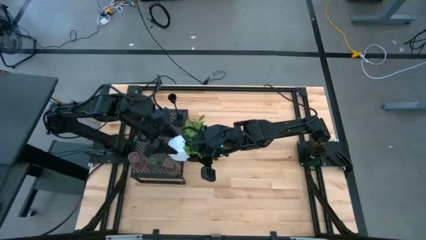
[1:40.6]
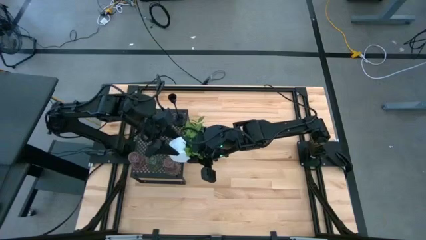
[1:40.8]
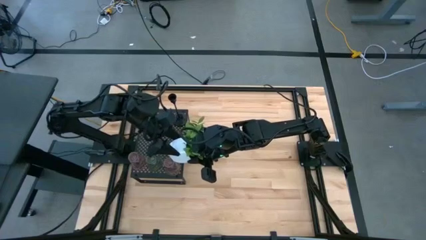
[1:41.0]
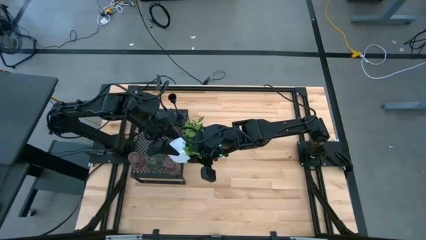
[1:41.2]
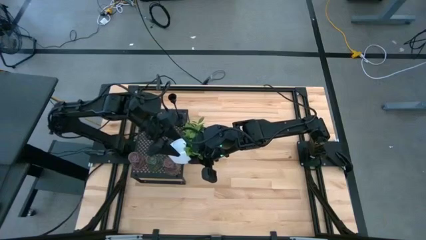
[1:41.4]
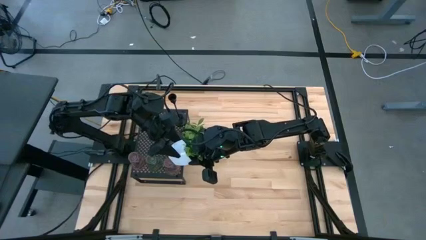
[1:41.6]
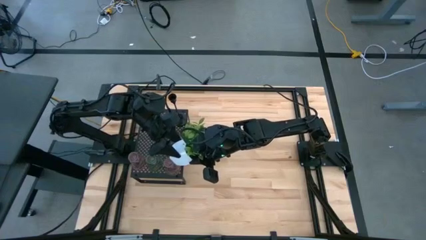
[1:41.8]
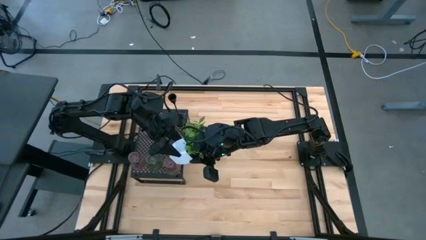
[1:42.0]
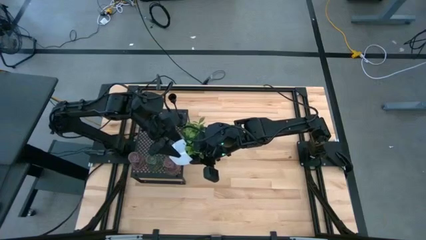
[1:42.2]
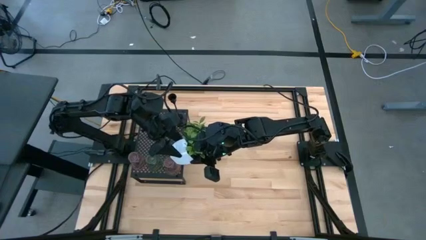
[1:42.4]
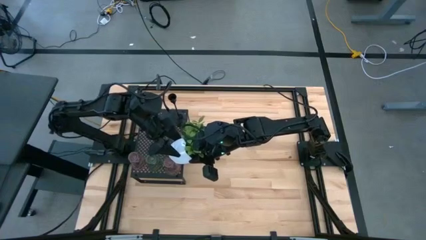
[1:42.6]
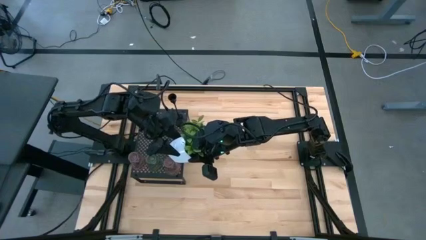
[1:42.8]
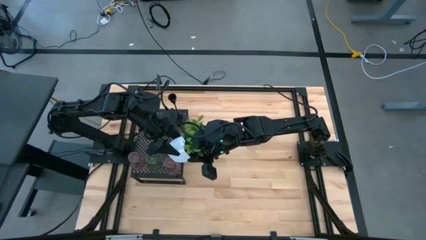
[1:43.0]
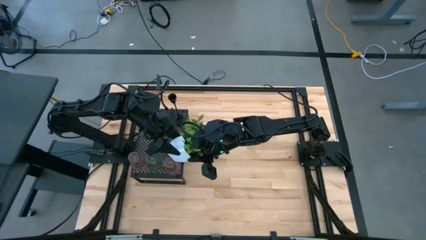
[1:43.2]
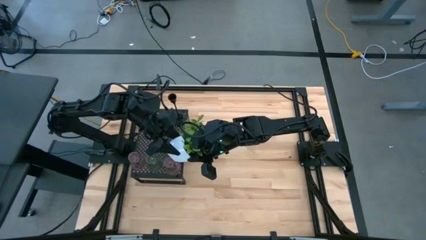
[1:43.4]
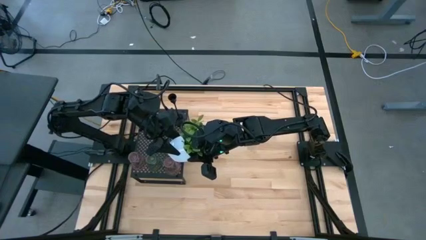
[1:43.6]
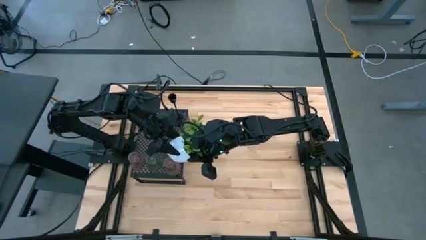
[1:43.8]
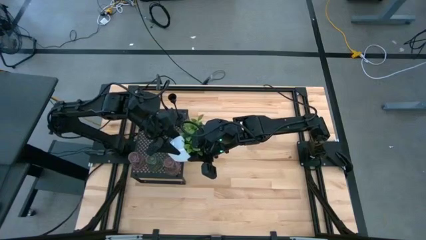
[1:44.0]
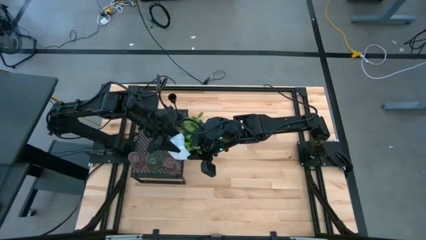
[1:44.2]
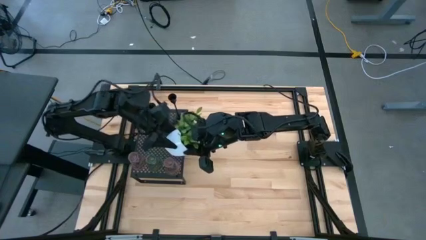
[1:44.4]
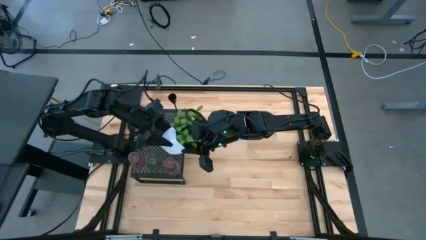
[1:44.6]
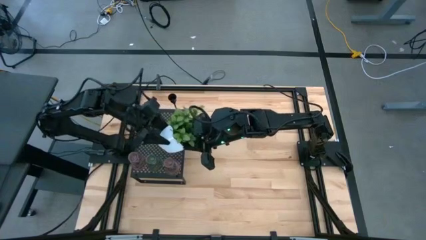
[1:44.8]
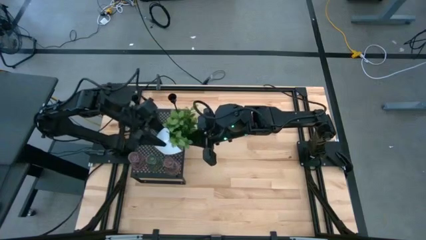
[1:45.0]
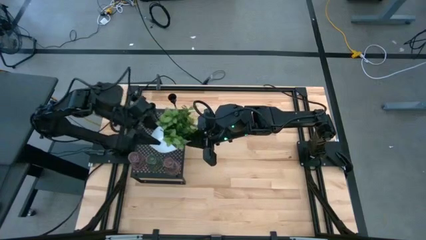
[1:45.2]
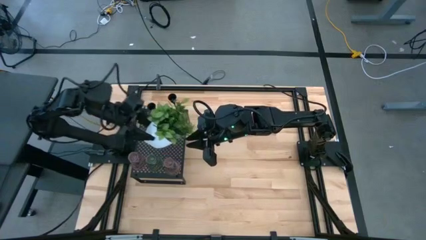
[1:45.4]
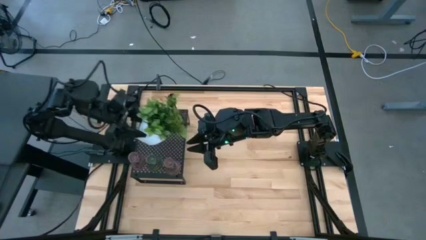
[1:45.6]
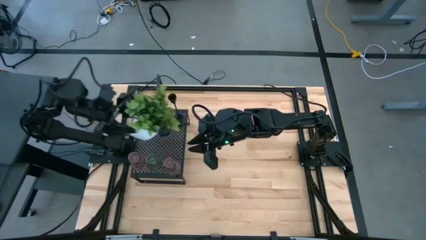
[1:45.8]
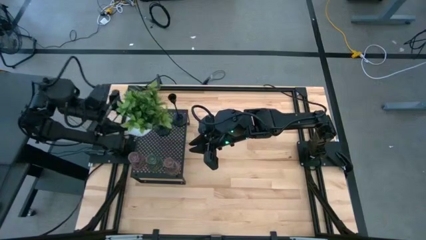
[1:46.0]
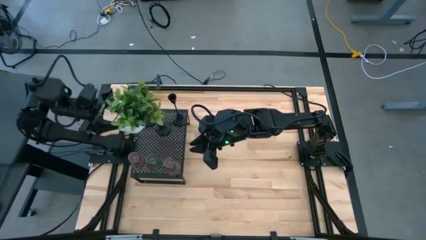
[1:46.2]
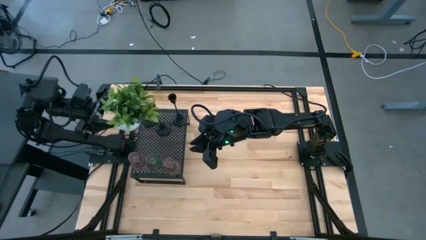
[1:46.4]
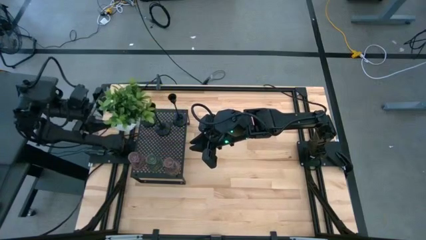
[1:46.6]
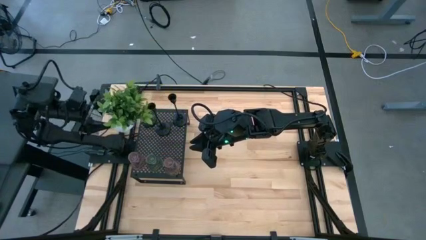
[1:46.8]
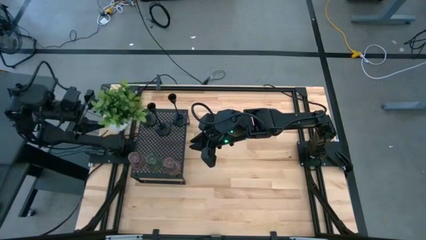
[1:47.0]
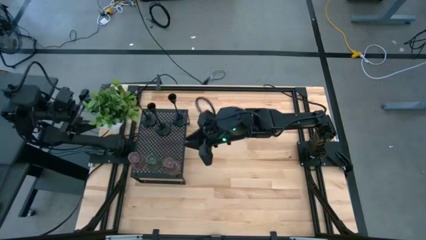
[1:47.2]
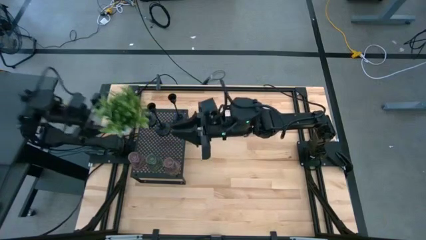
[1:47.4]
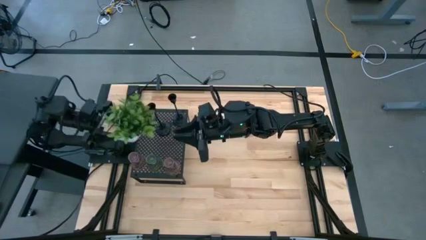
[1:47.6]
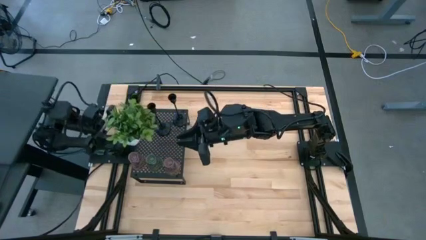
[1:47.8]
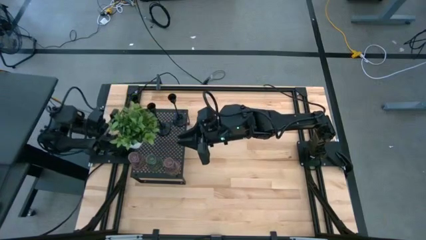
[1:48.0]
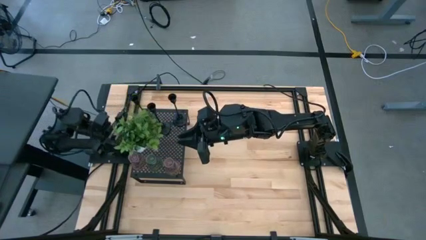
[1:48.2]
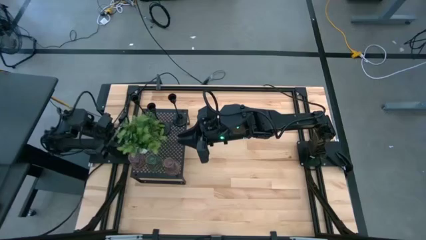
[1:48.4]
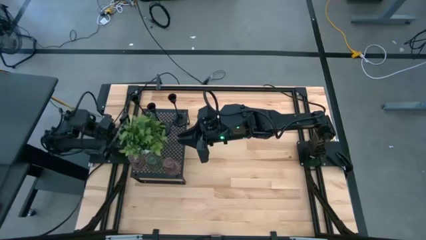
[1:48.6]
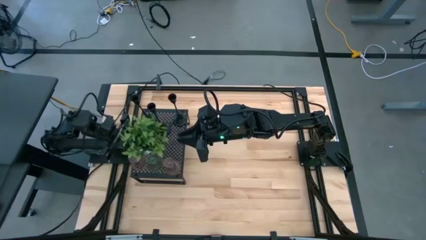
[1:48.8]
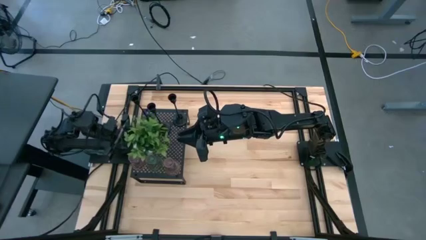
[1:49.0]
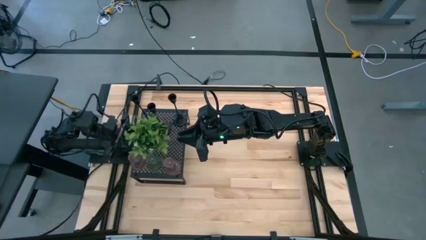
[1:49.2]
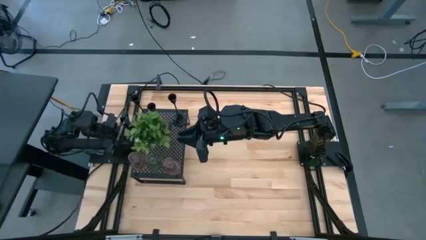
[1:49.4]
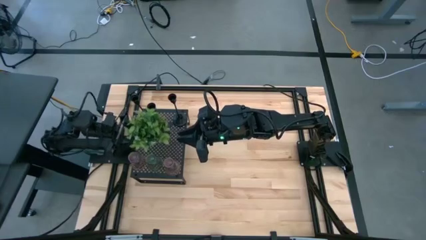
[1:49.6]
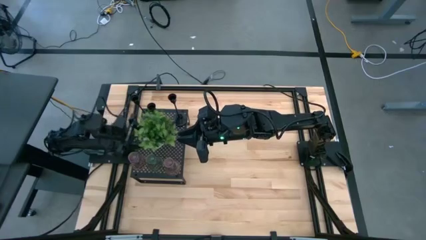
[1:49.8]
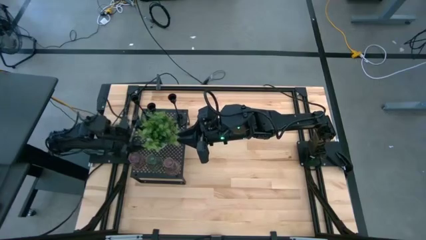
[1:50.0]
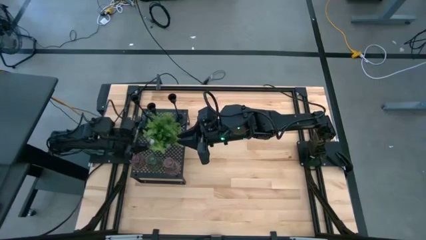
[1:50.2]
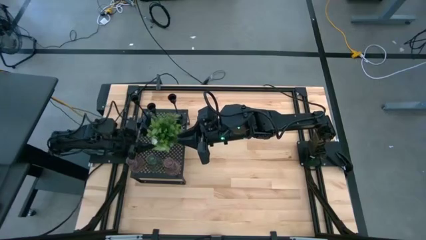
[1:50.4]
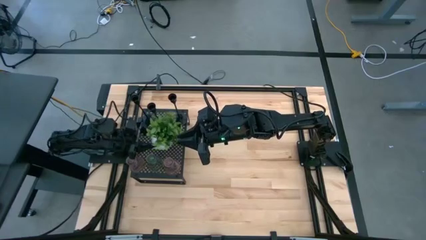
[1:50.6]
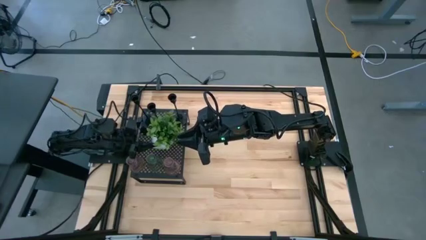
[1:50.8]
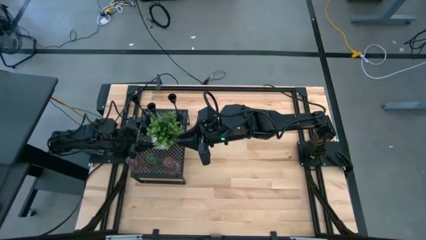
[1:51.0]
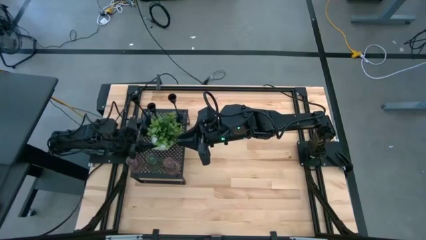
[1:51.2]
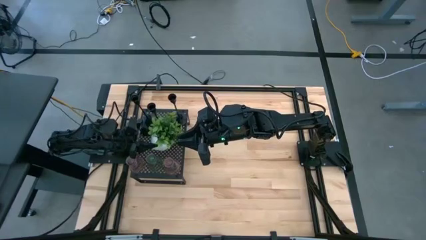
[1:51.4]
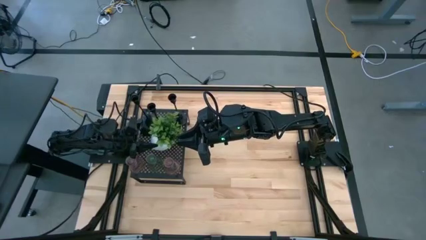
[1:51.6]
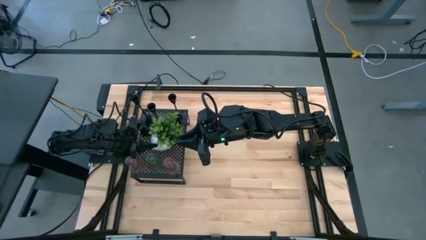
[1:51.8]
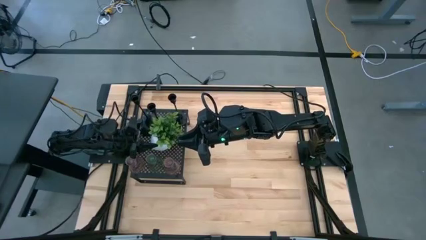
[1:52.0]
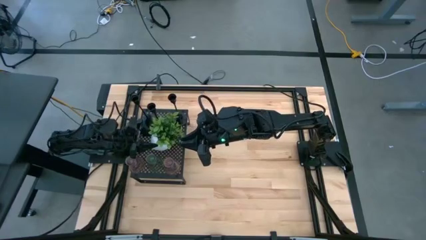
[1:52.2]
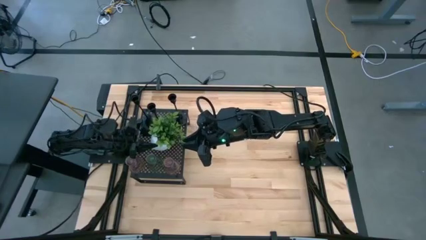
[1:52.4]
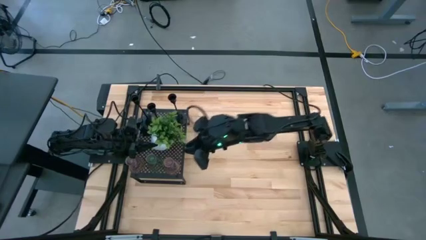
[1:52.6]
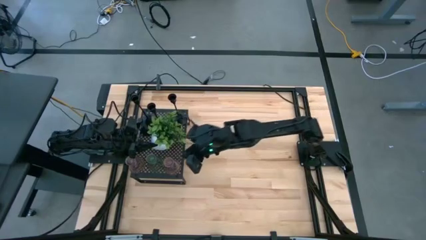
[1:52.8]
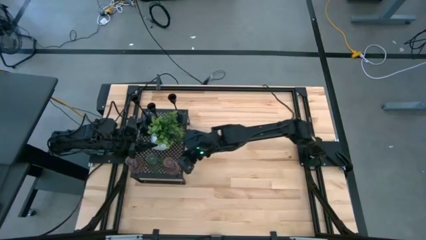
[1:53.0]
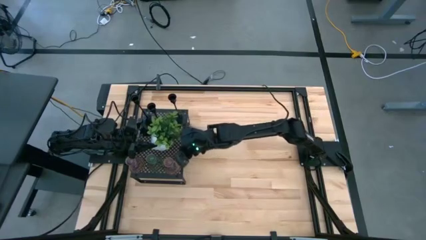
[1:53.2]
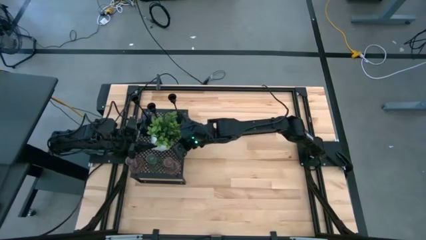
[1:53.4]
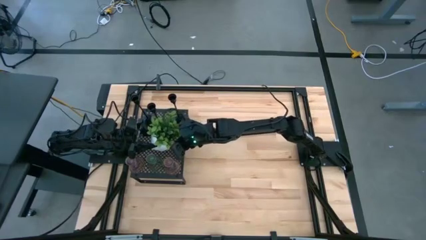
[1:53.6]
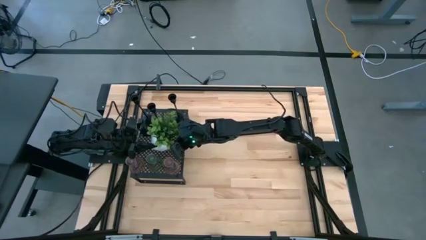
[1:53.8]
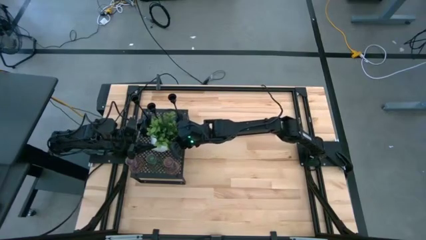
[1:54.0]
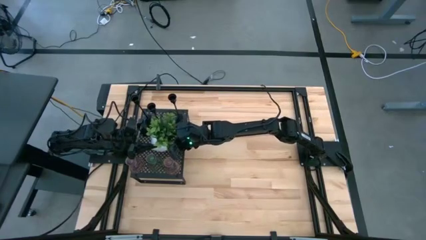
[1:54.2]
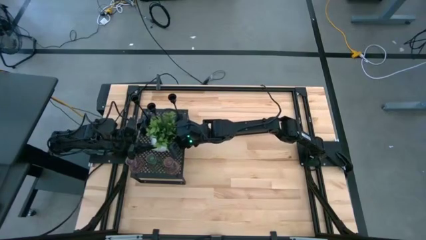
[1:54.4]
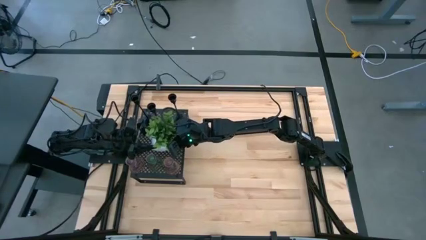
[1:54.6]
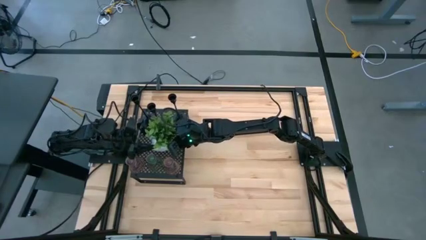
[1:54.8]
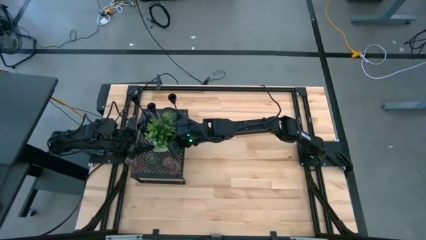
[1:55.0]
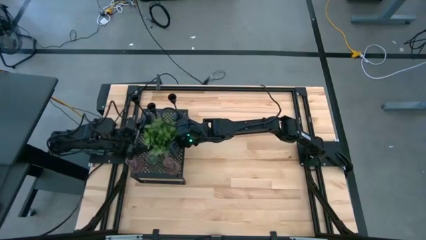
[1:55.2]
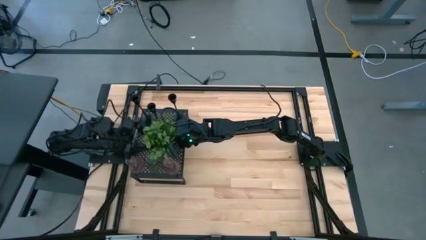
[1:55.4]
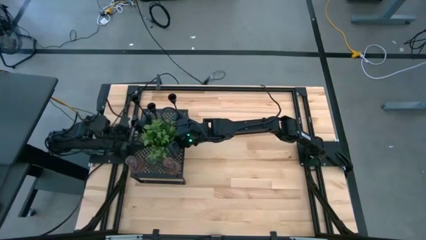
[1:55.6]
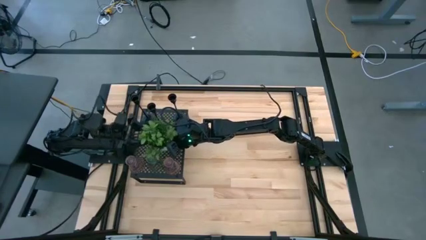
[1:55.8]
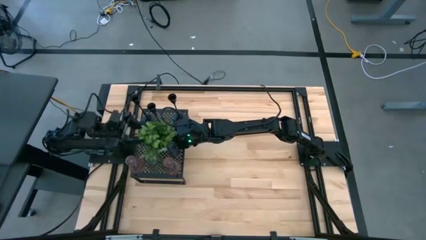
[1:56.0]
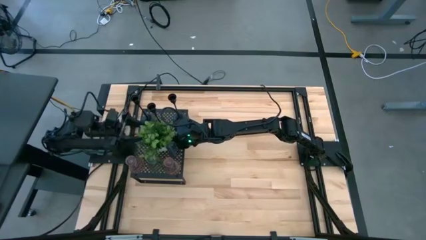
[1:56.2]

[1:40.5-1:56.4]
Task: Pick & Place candle stick holders
Put the decorative plant on the shelf
